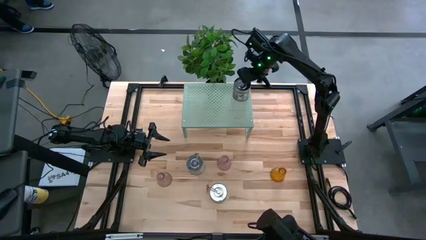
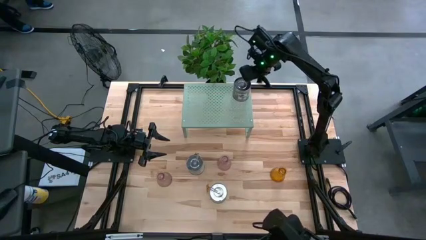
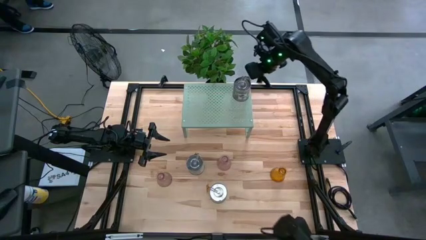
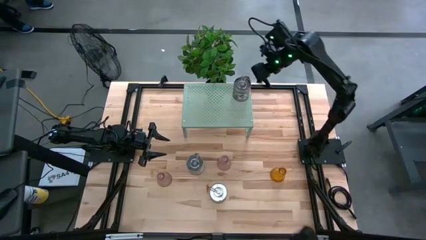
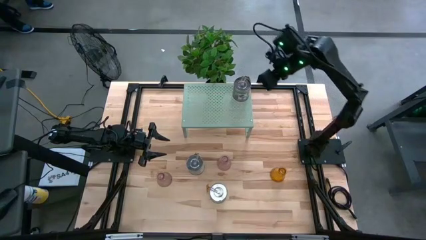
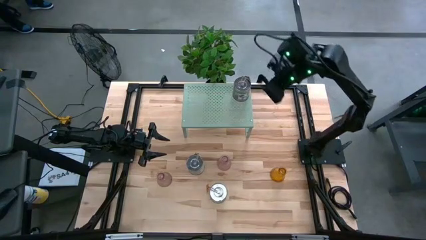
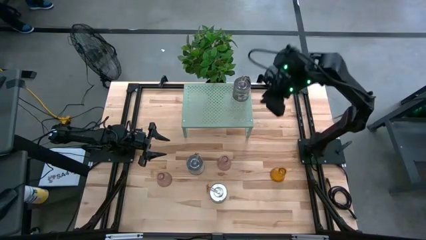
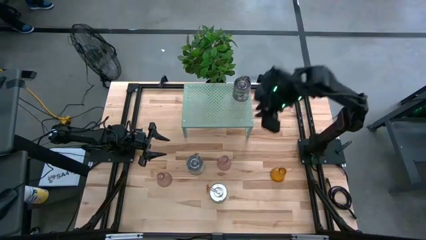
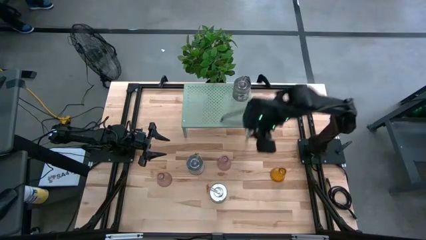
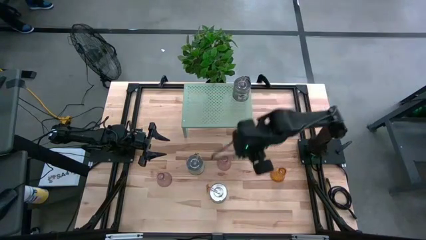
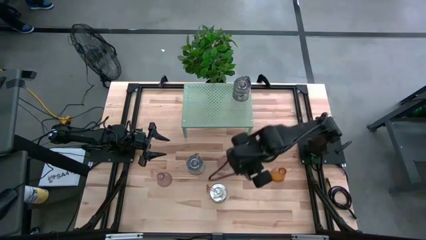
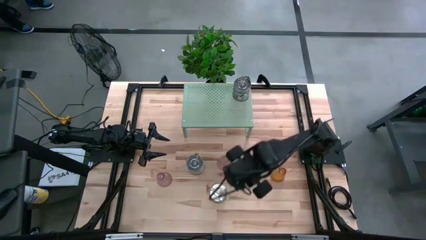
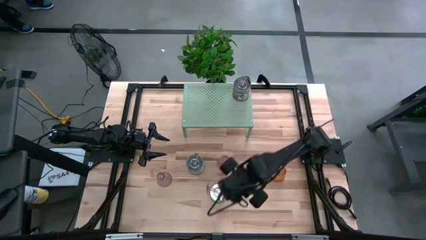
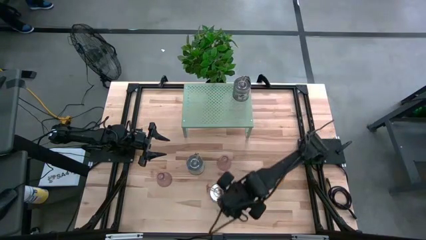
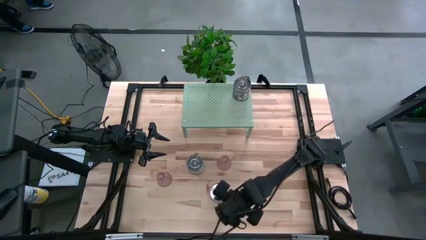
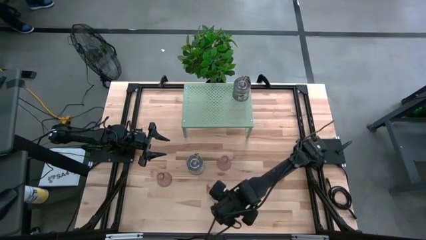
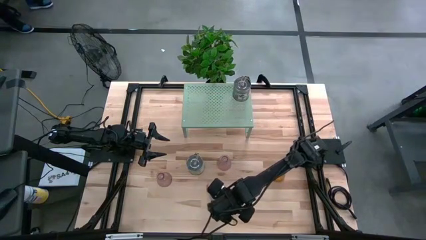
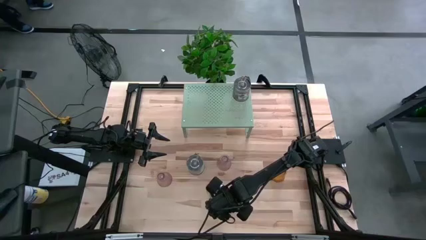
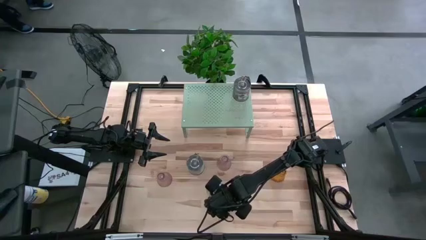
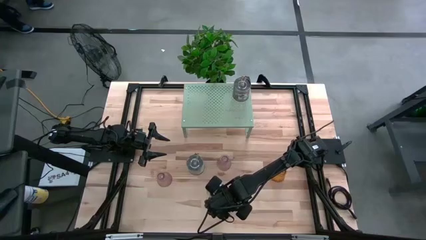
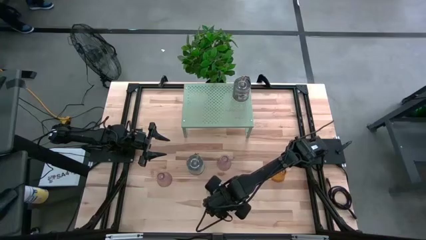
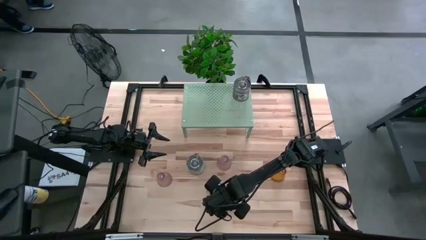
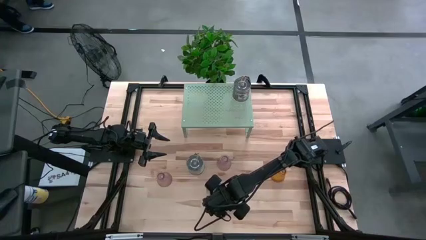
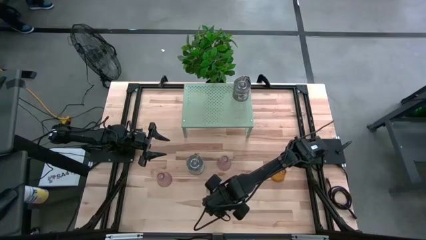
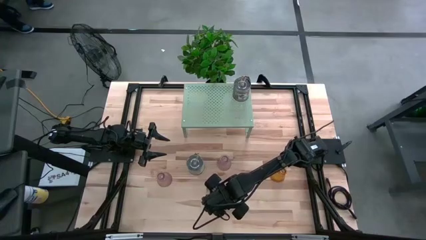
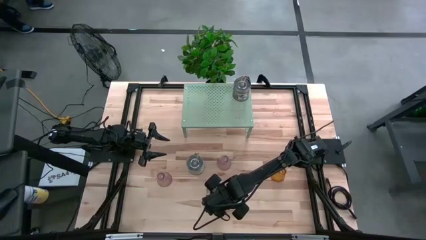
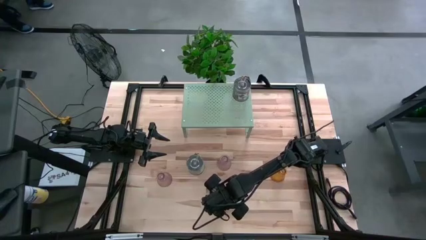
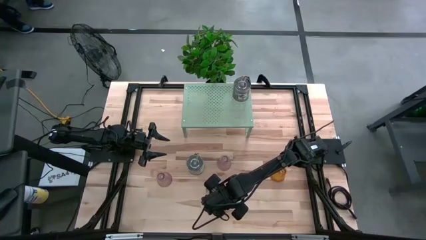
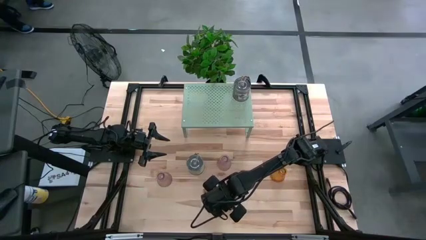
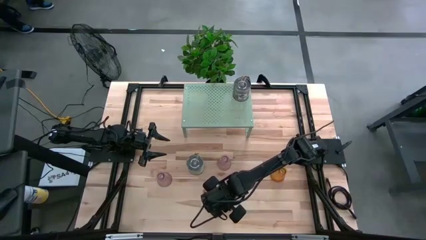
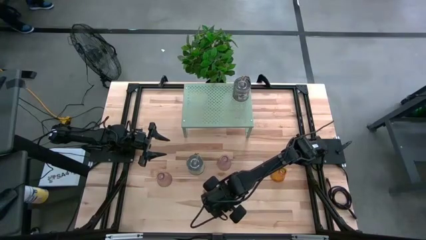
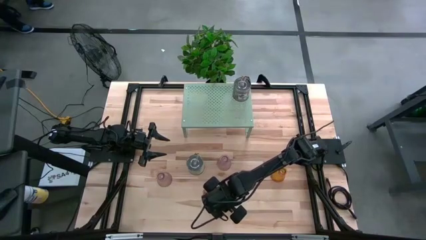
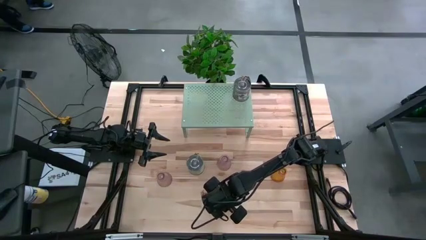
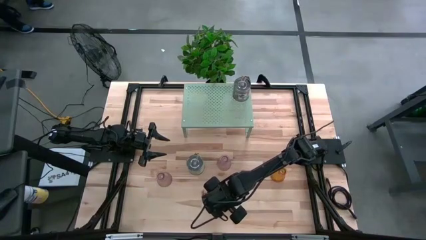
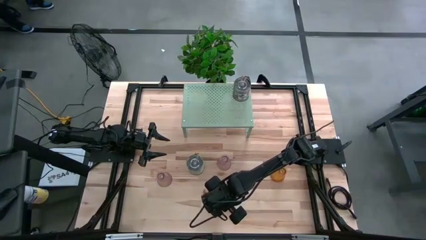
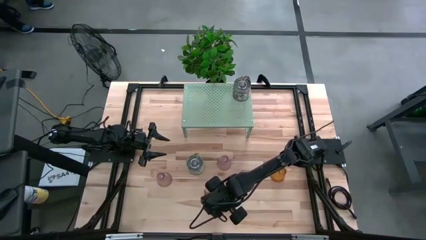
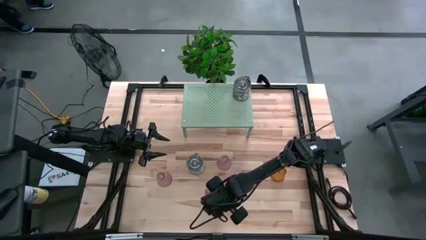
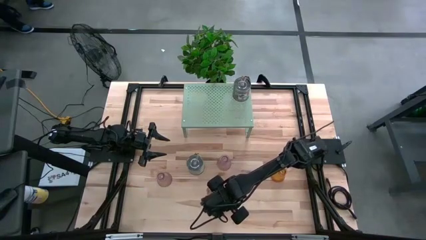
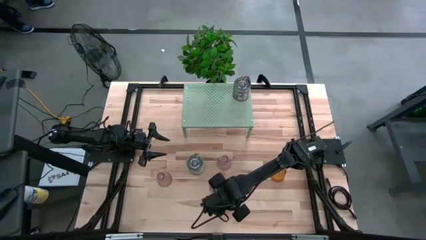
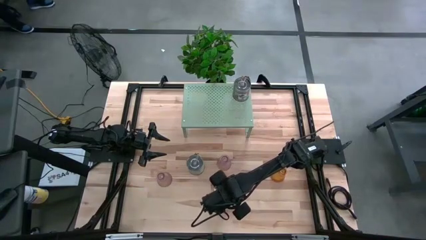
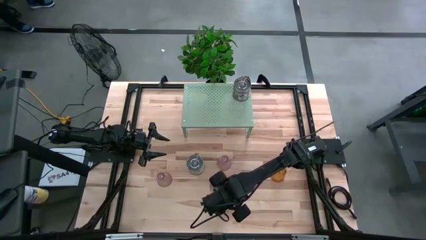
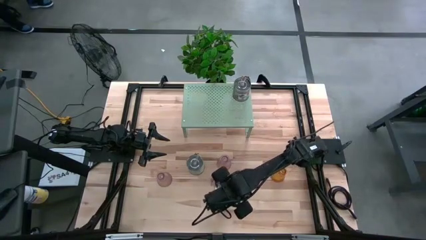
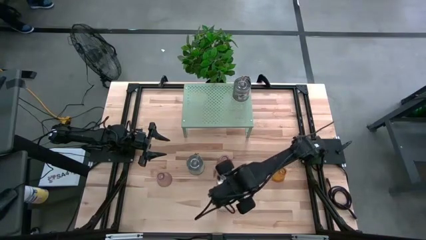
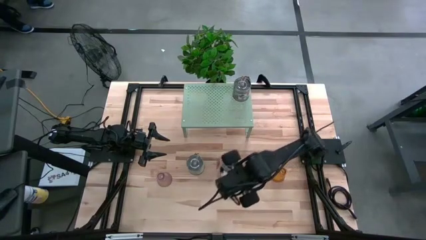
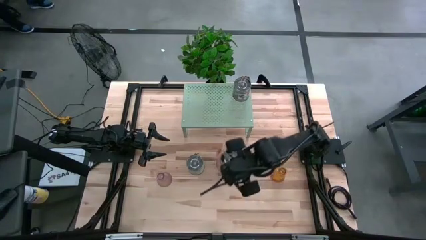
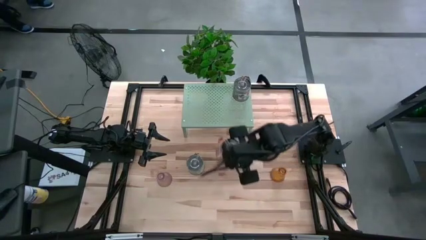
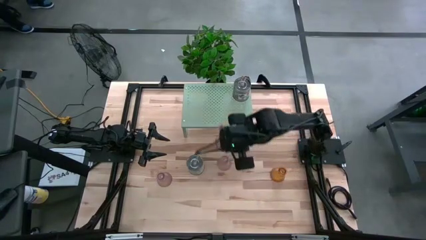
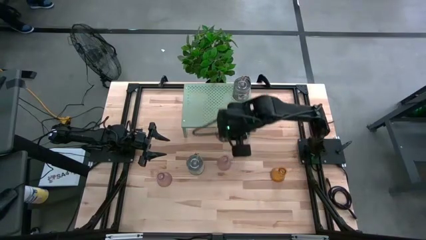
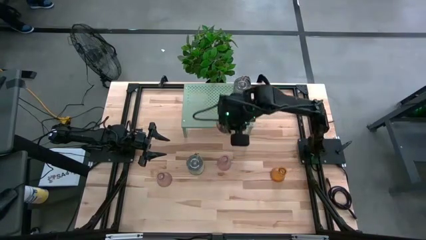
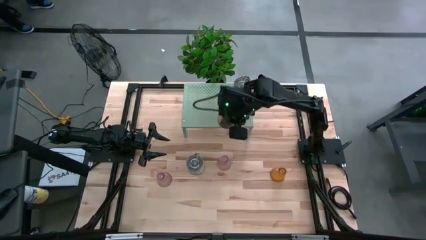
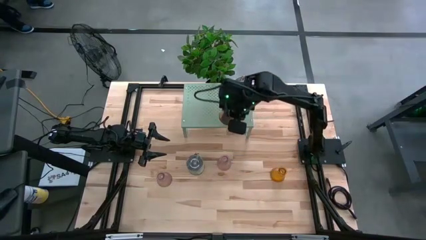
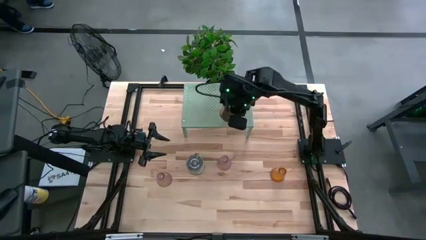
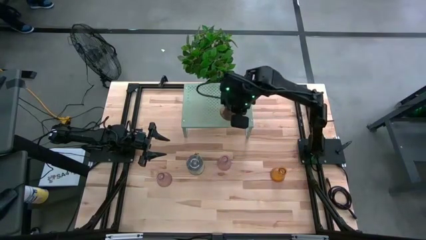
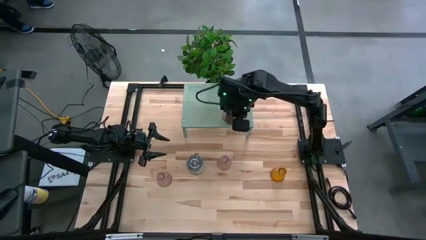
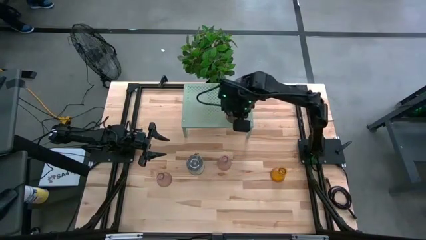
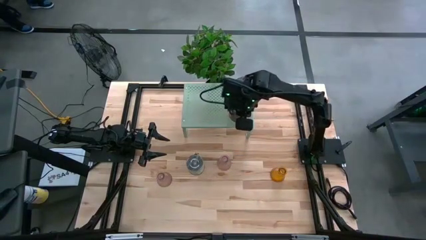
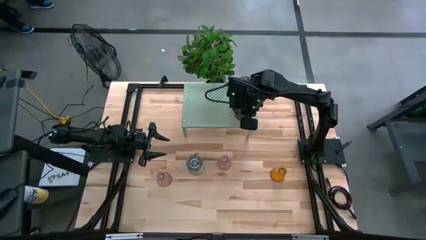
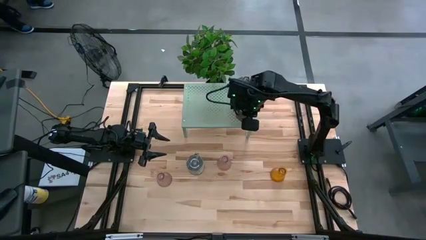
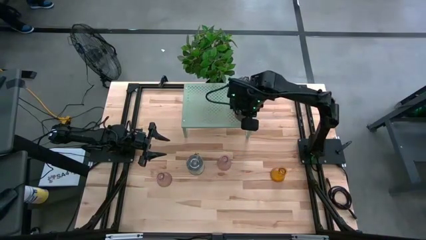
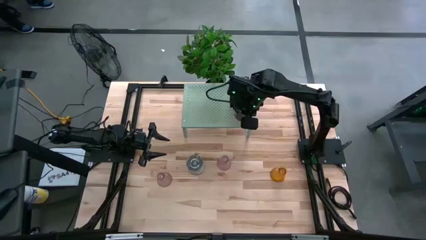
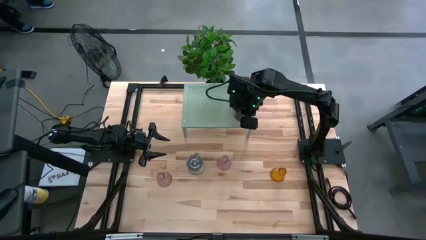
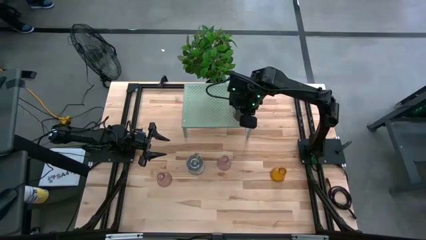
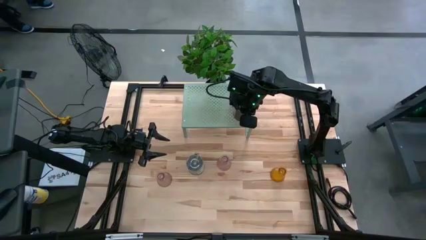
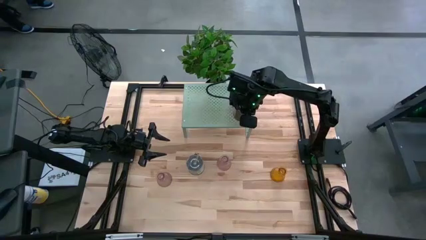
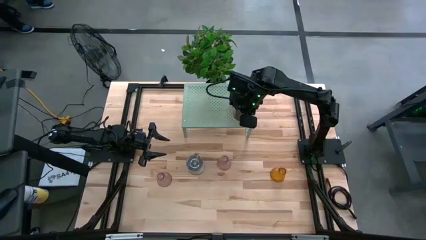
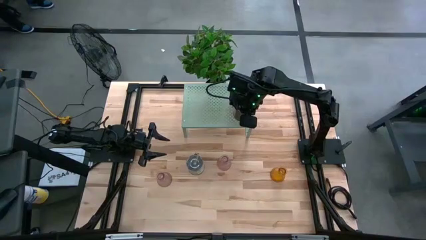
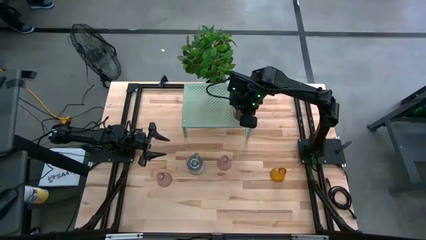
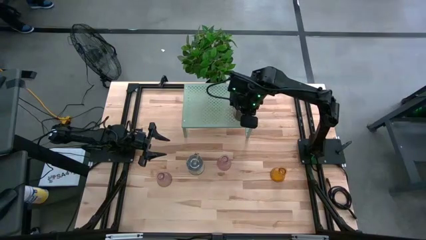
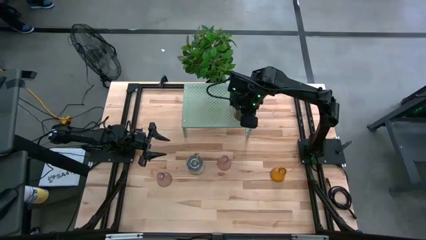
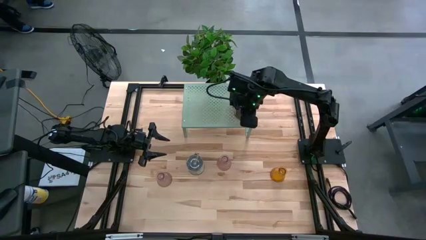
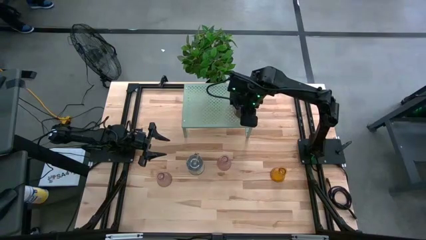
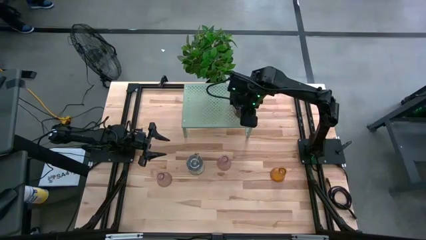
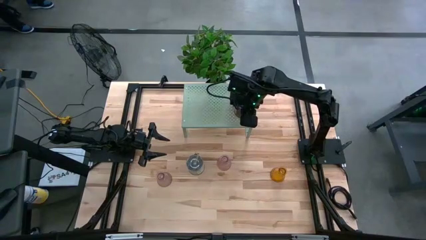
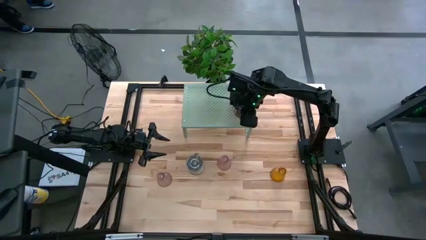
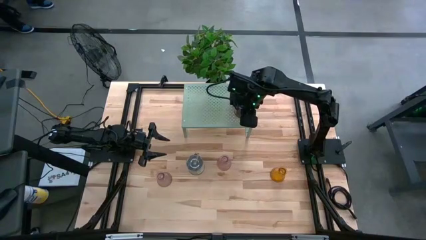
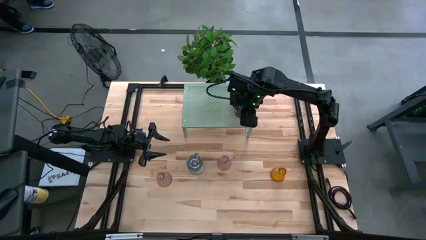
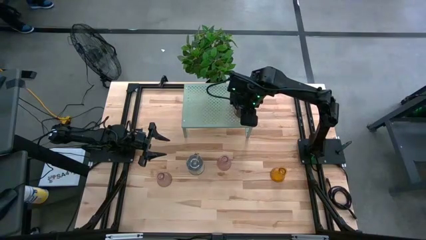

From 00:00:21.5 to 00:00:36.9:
Task: Pick & Place candle stick holders
Align the bottom scented candle with the other scented candle on the shelf

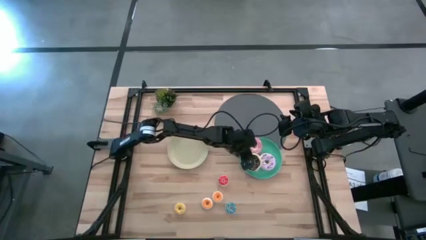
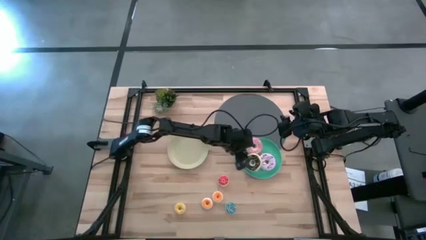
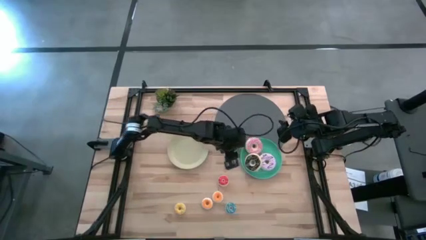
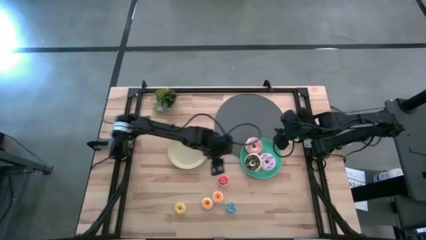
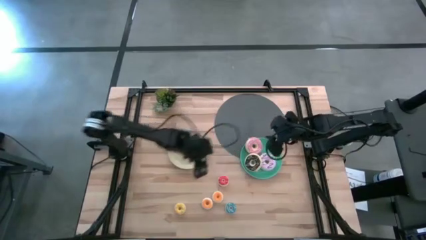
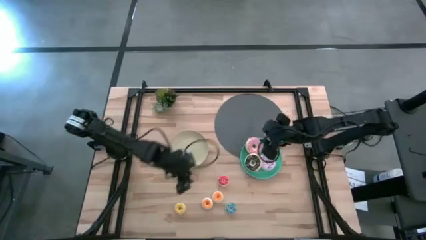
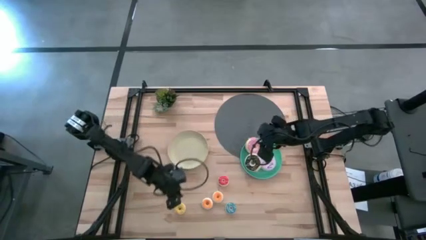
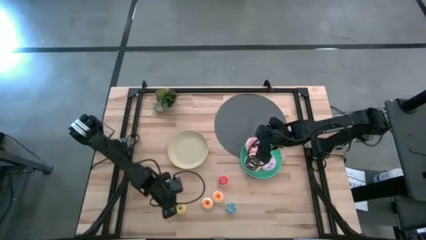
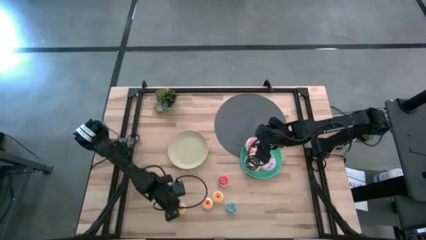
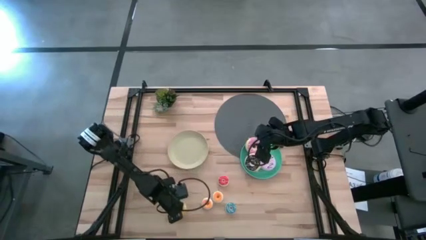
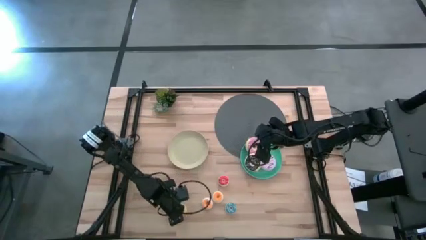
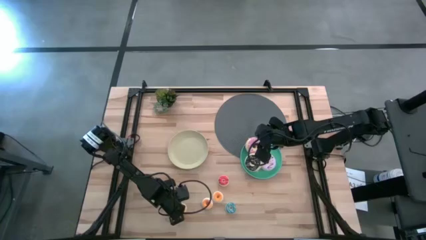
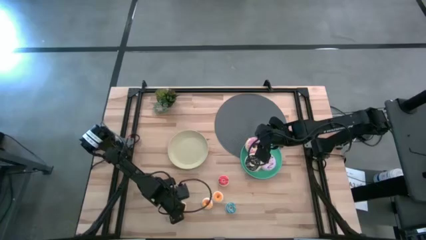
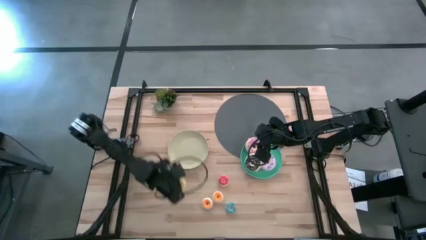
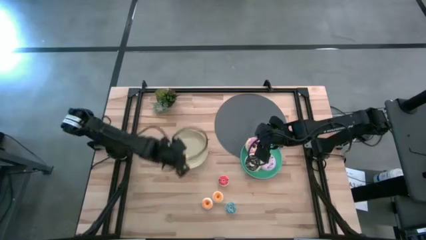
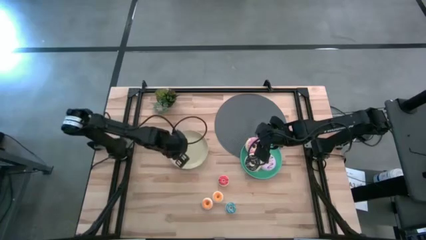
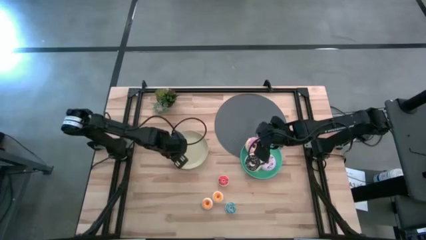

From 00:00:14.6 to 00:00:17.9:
Task: Pick & Place donuts
Put the small yellow donut on the light brown plate
